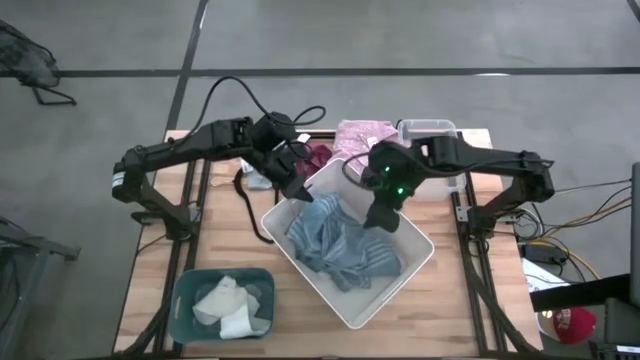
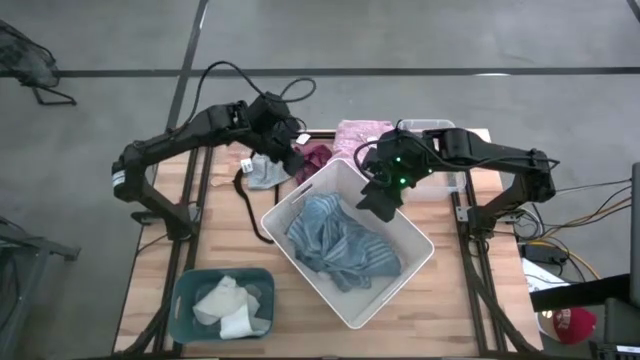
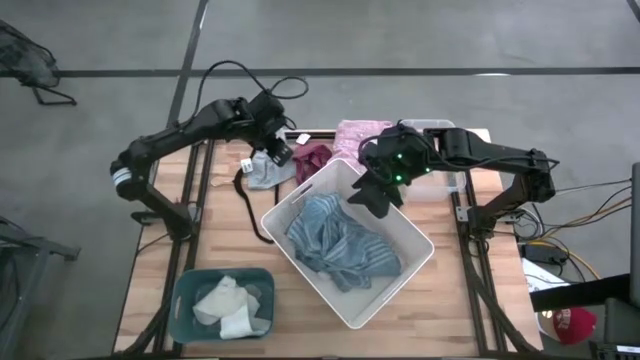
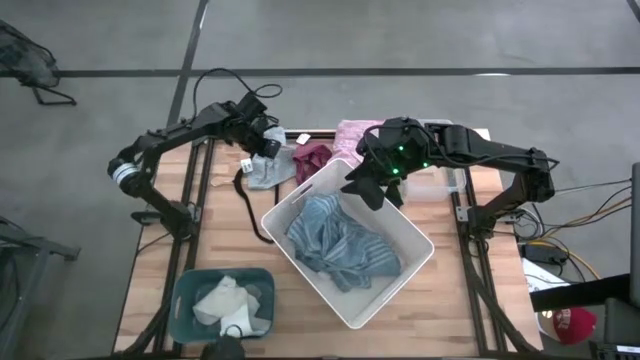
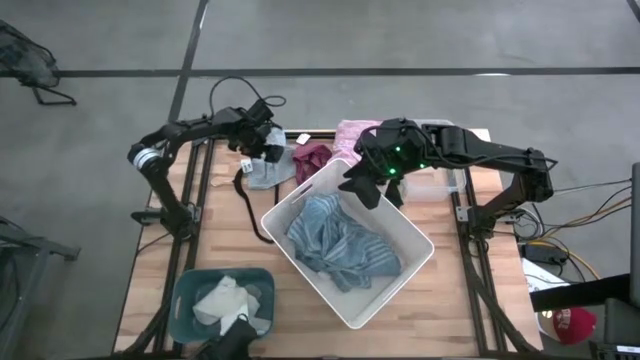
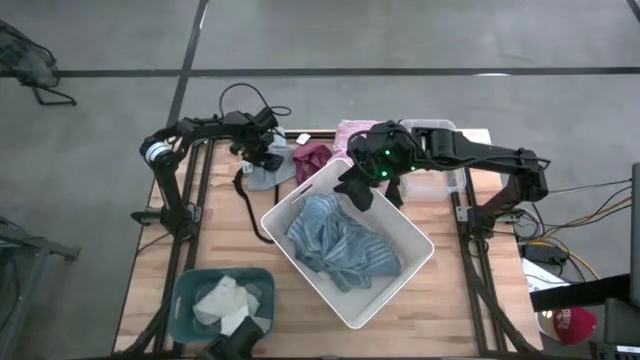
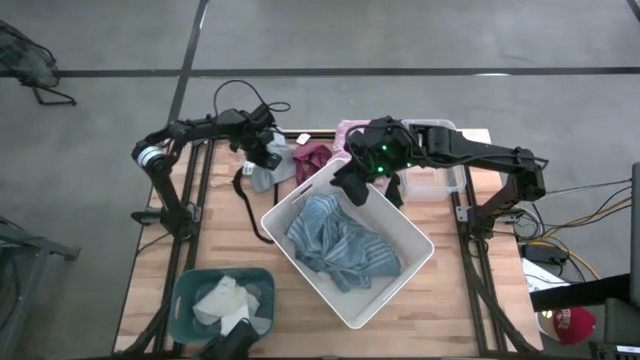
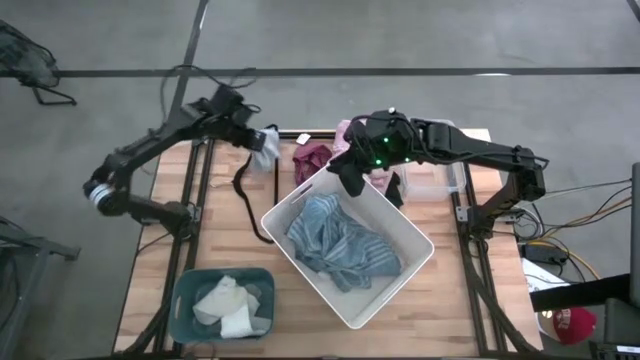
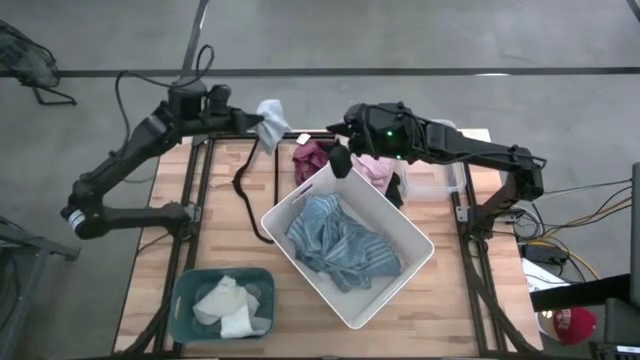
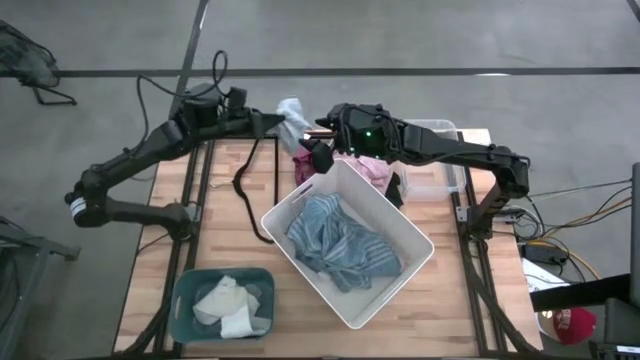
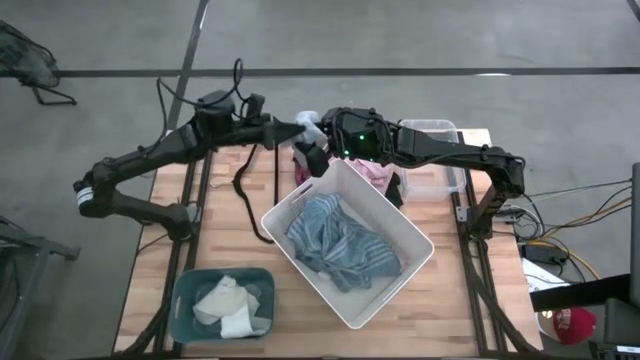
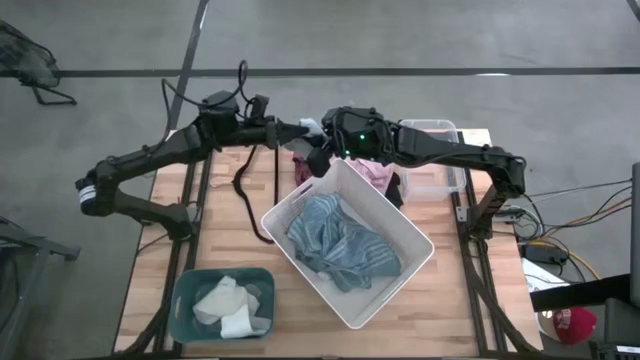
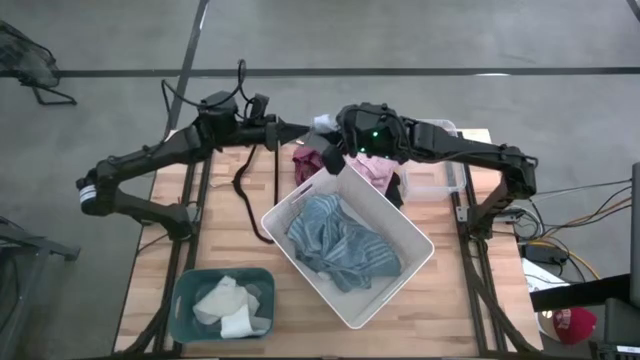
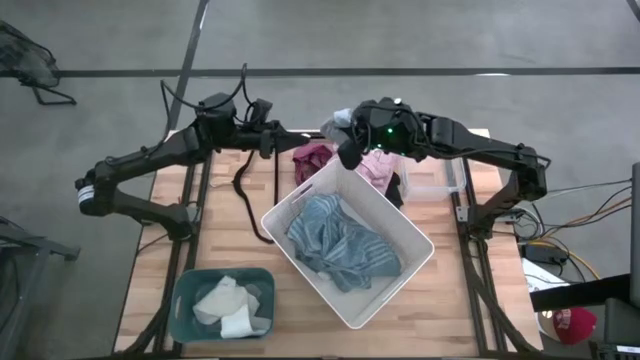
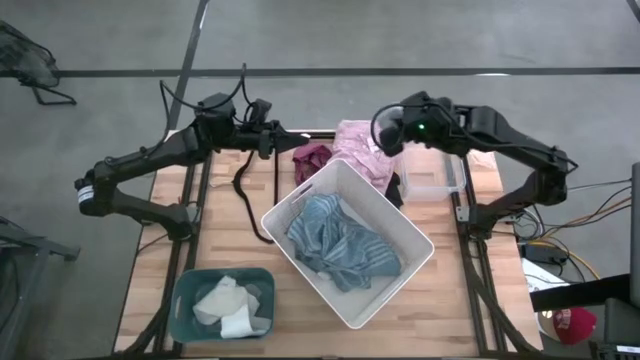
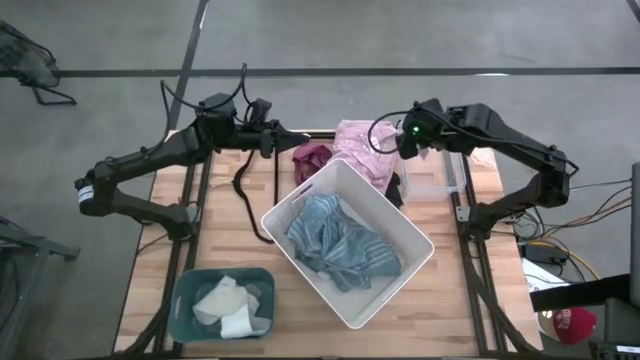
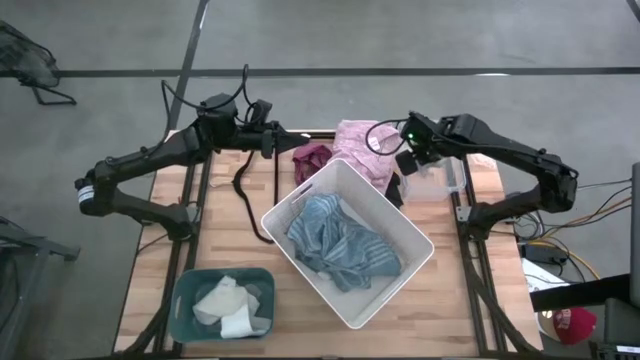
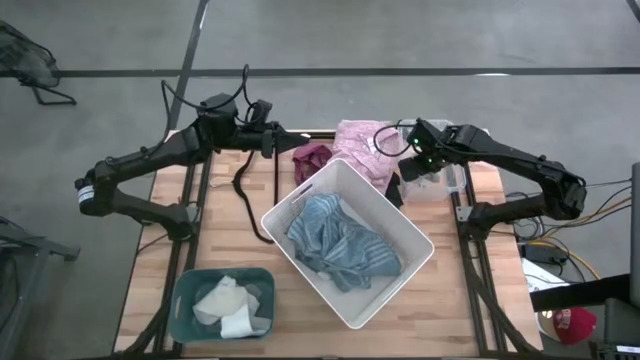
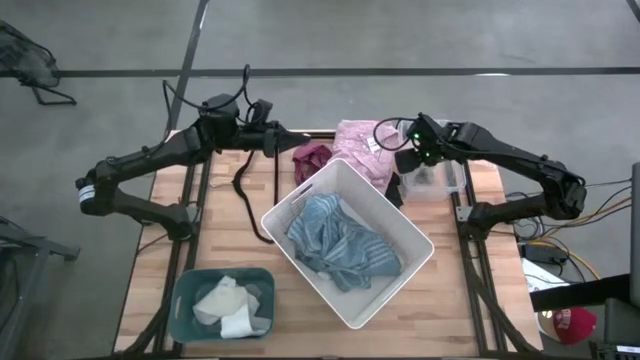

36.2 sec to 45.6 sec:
Task: Pick & Place Cloths
Put the gray shorts into the transparent bin

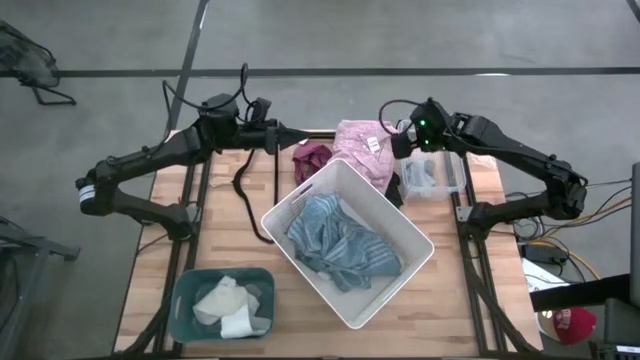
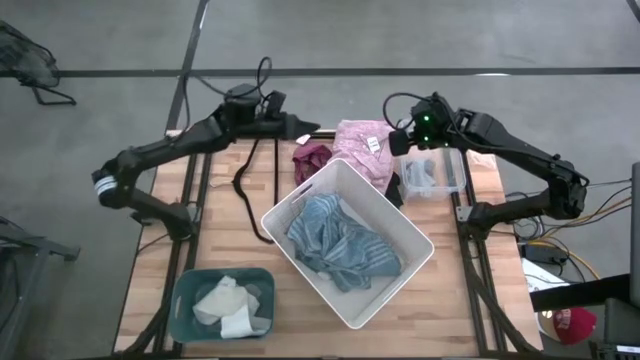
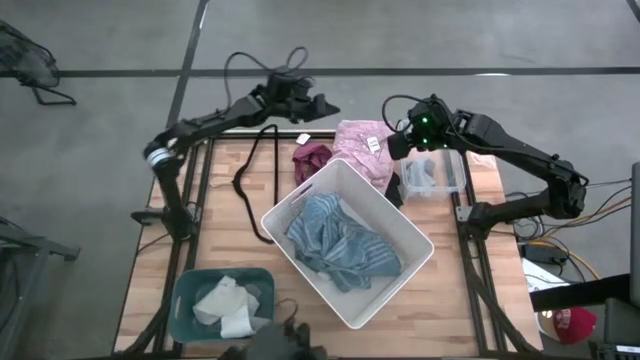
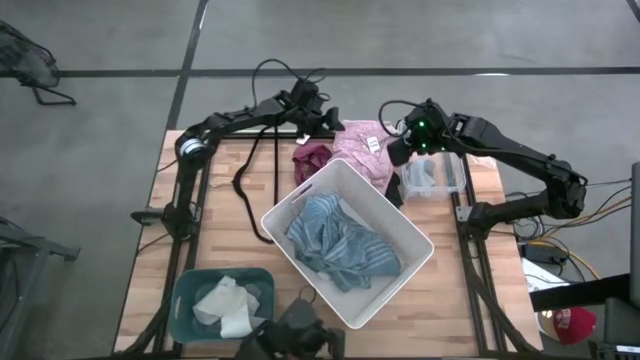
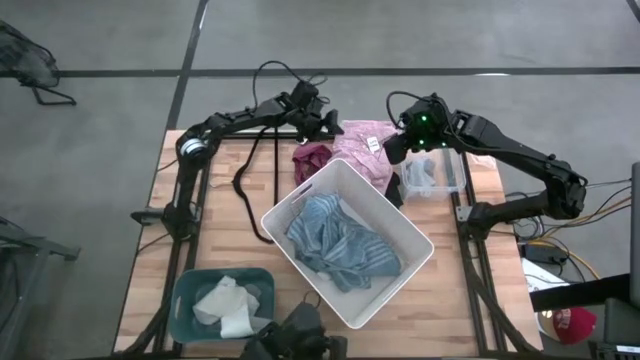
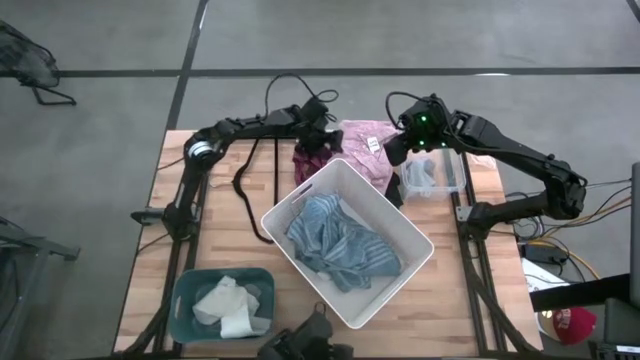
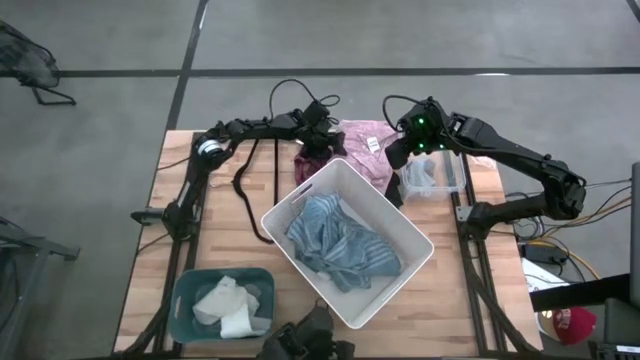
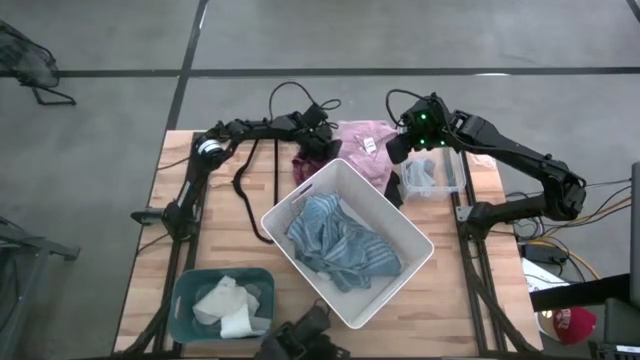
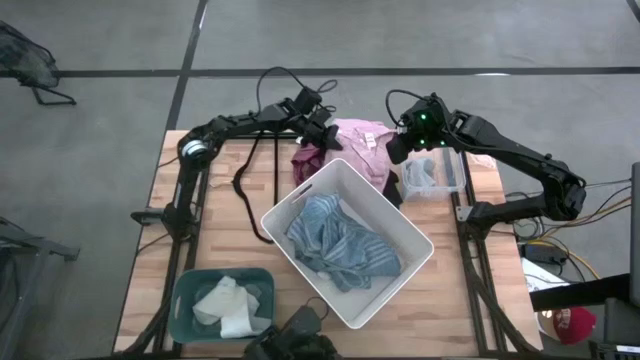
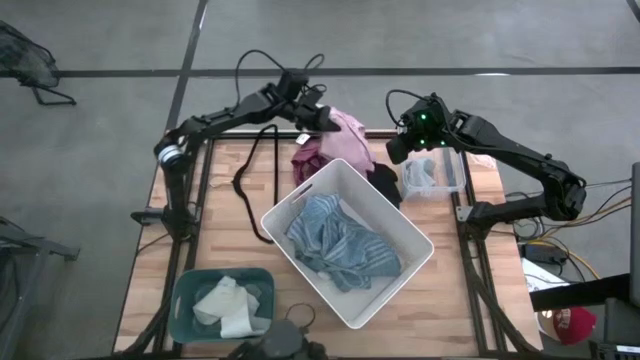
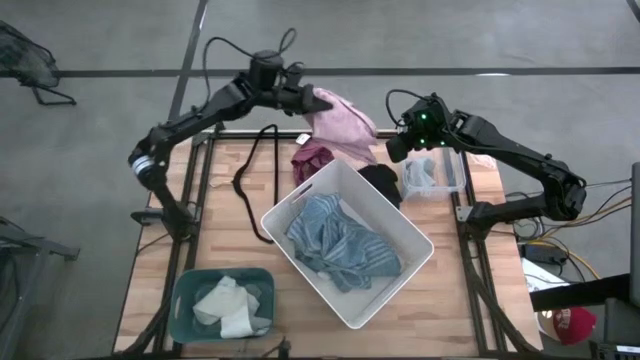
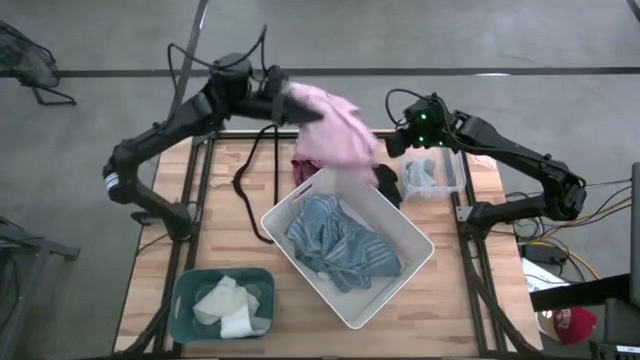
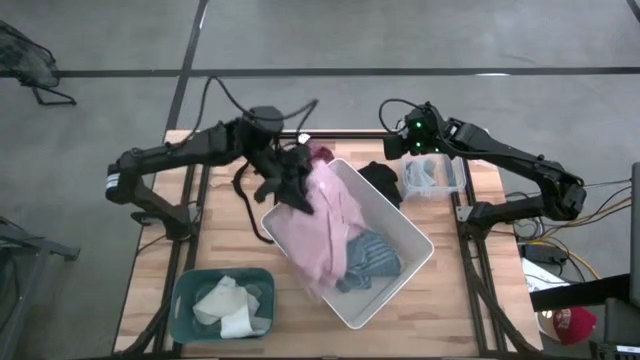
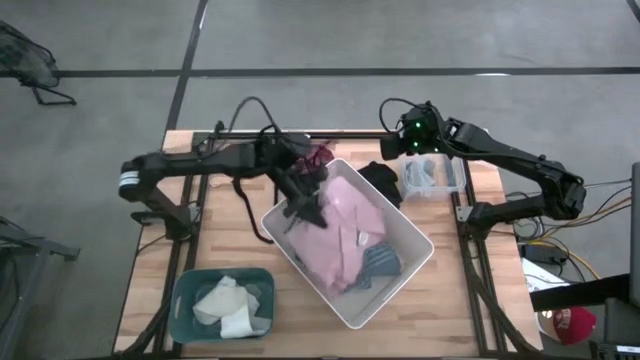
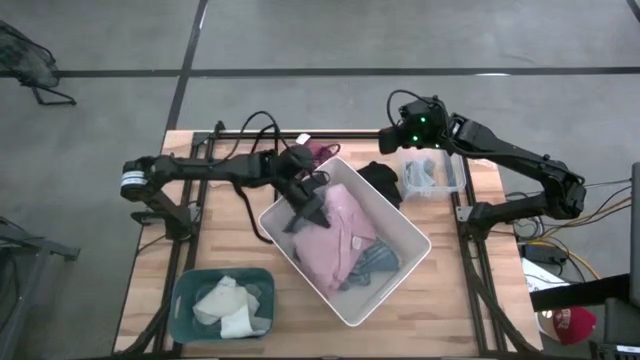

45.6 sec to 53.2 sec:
Put the pink shirt into the white bin

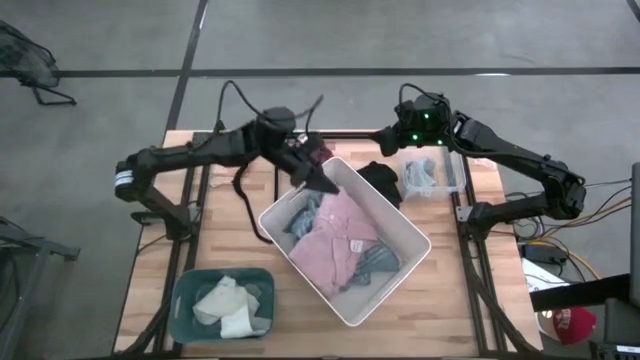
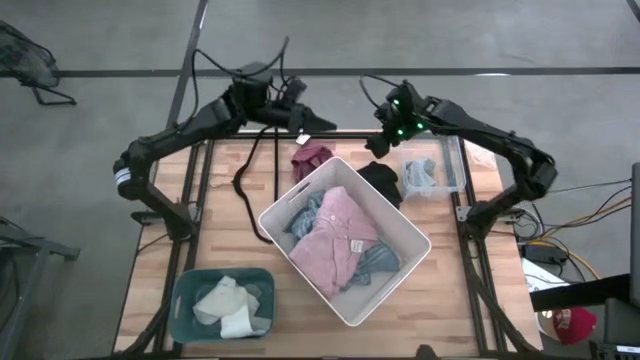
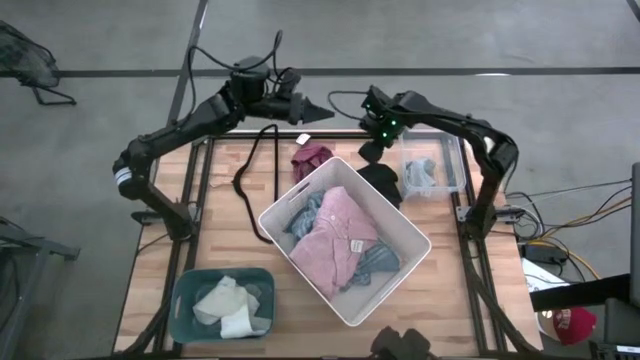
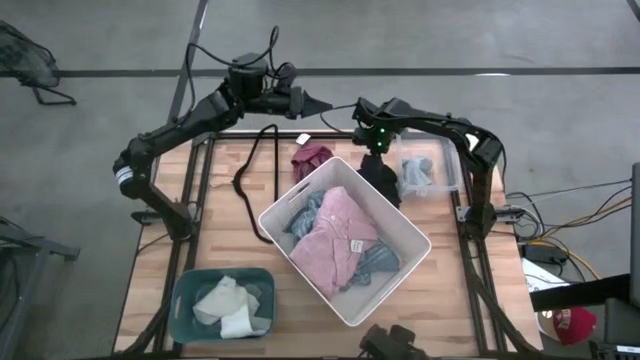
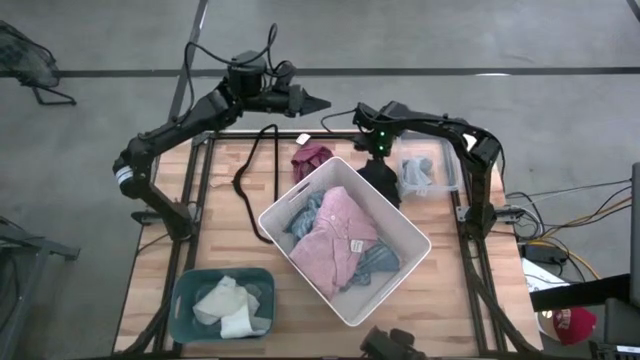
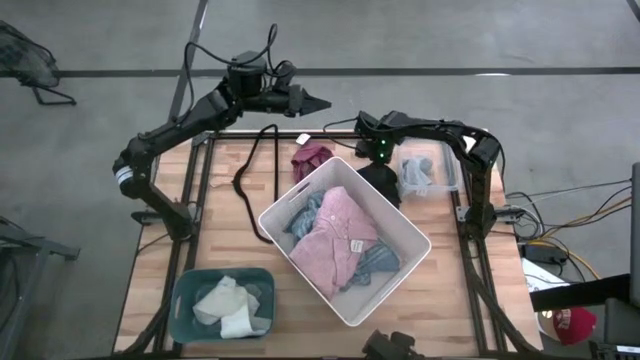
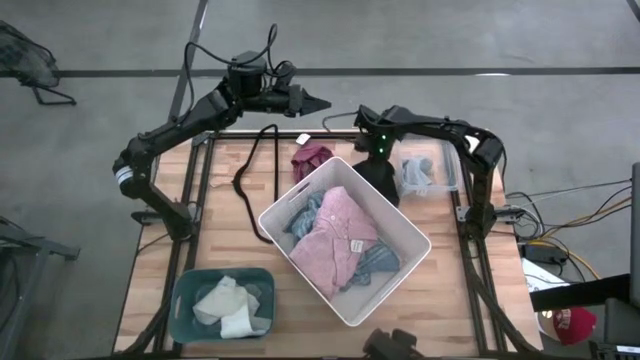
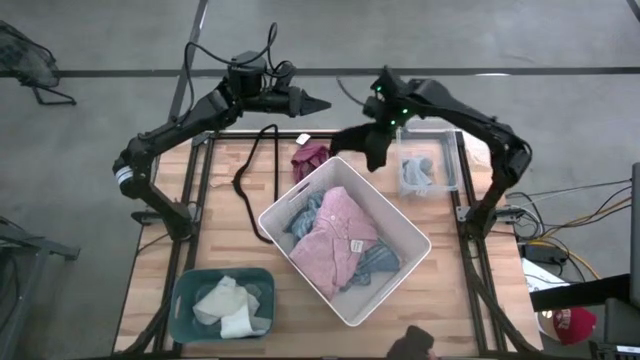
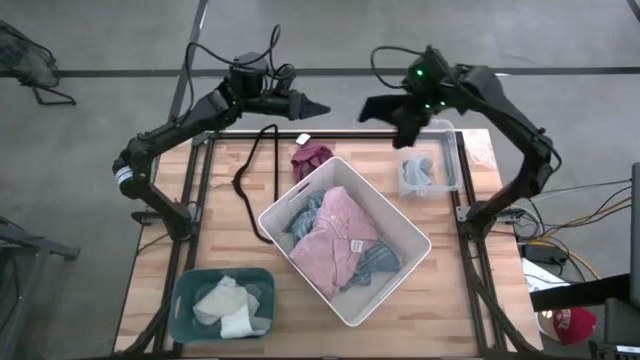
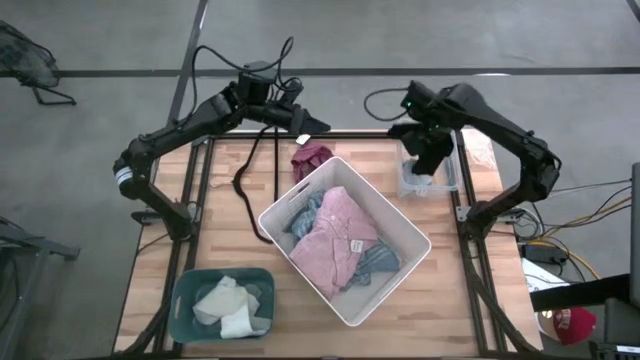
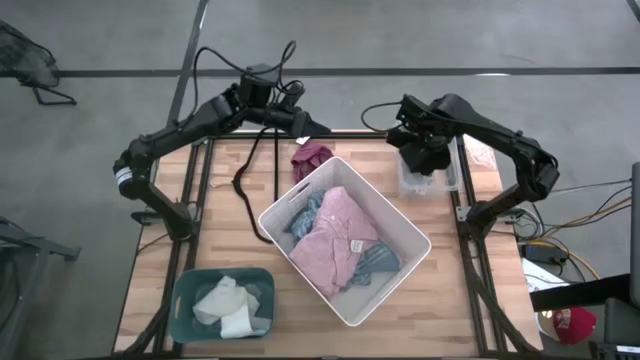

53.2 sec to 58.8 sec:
Put the black shorts into the transparent bin

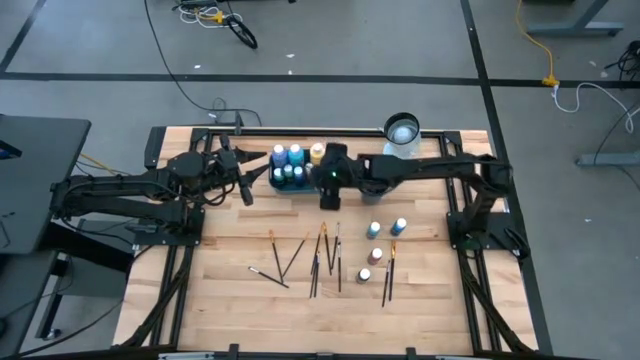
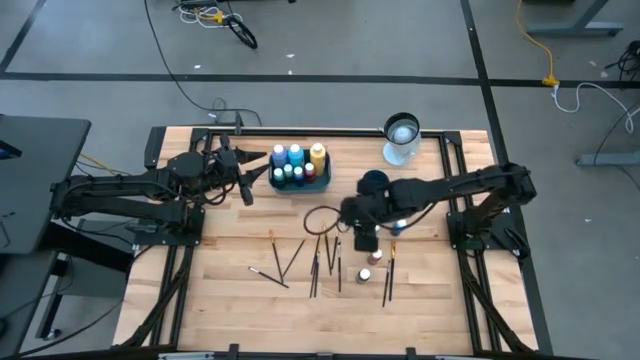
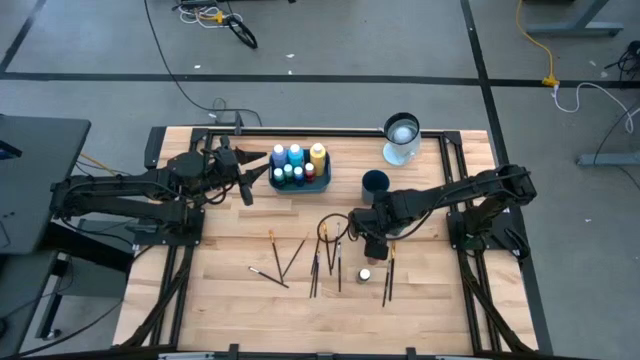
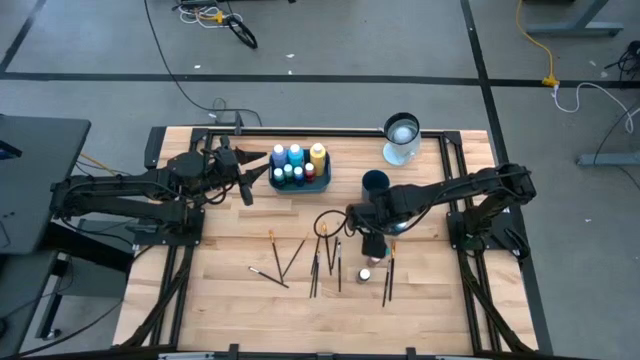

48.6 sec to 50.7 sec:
Task: Pick & Place Paint Supplies
Put the light blue paint bottle into the blue bin
